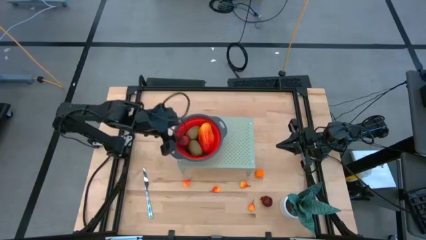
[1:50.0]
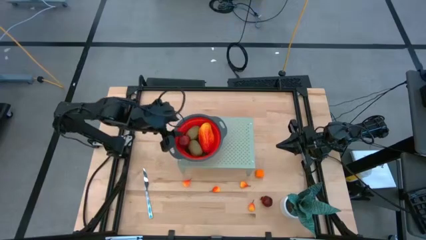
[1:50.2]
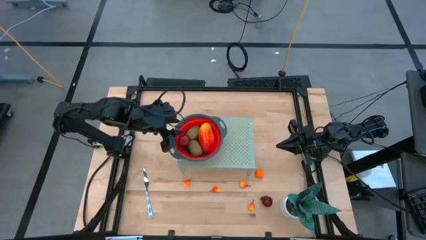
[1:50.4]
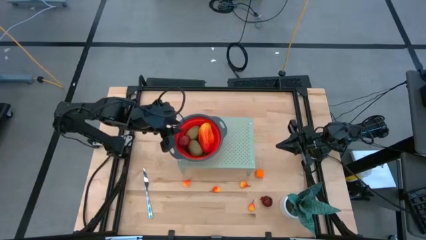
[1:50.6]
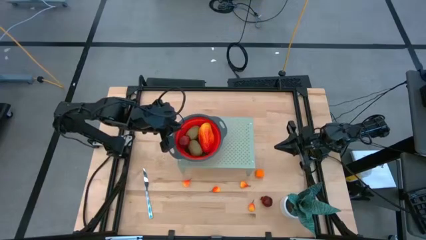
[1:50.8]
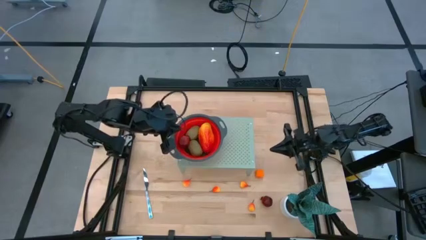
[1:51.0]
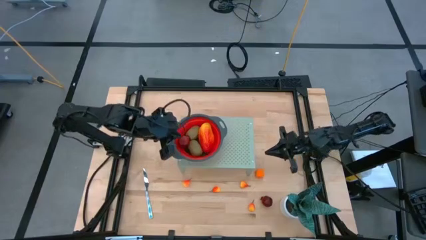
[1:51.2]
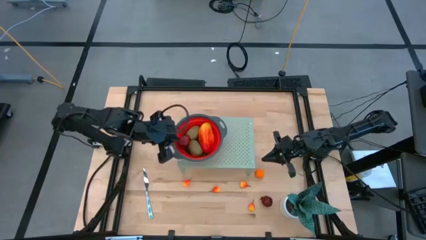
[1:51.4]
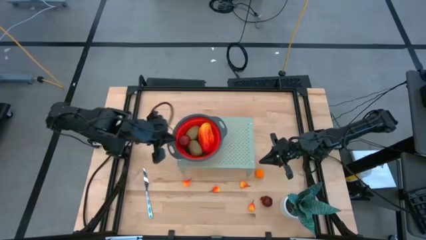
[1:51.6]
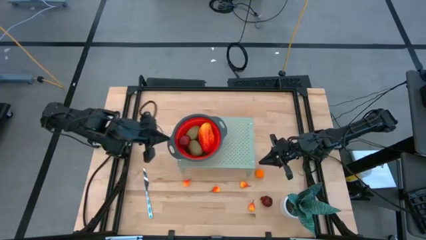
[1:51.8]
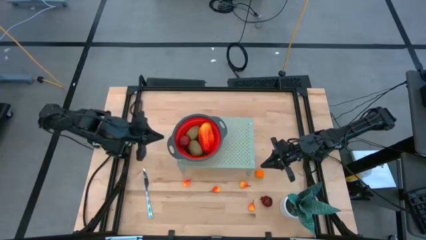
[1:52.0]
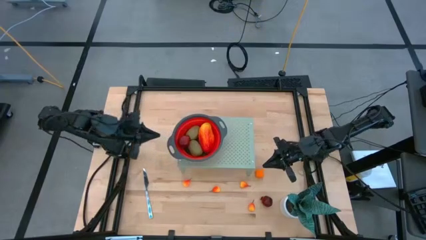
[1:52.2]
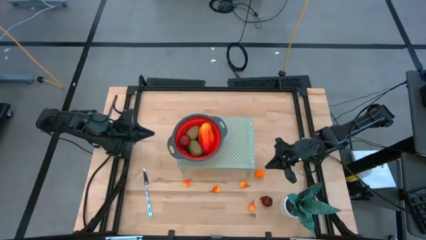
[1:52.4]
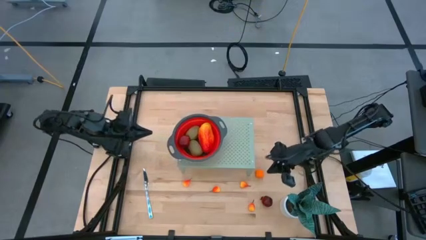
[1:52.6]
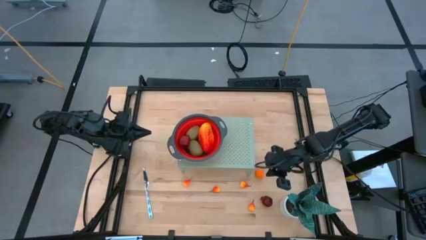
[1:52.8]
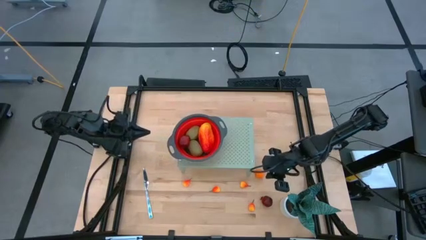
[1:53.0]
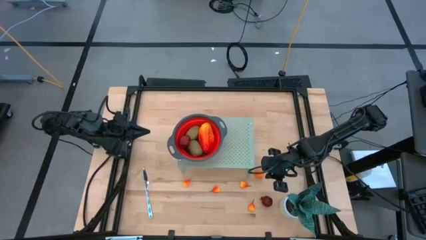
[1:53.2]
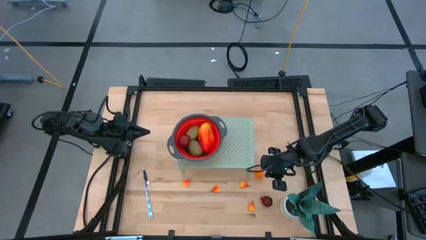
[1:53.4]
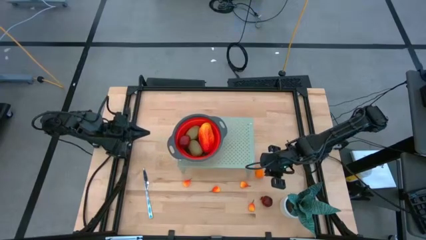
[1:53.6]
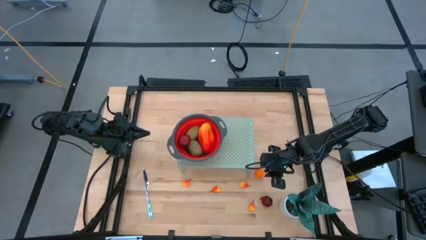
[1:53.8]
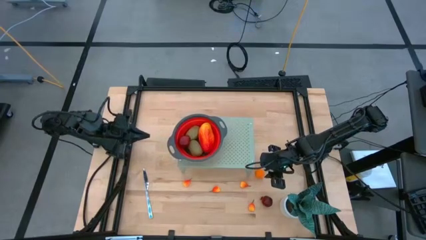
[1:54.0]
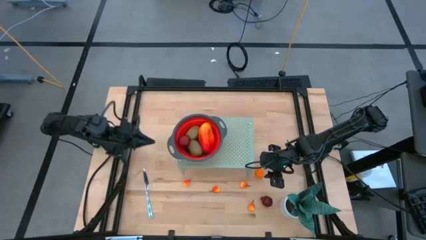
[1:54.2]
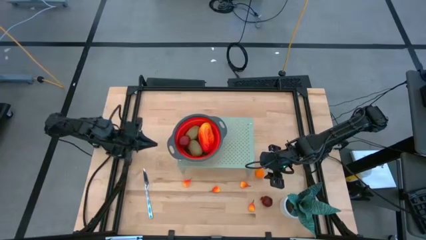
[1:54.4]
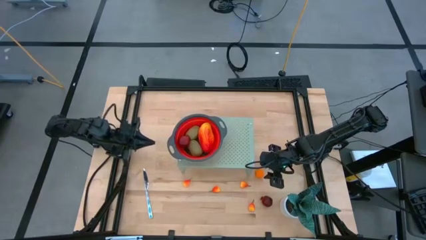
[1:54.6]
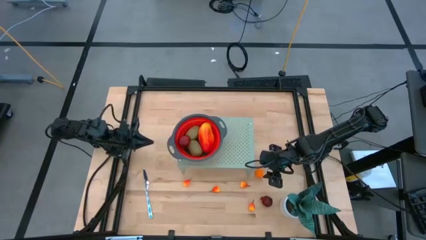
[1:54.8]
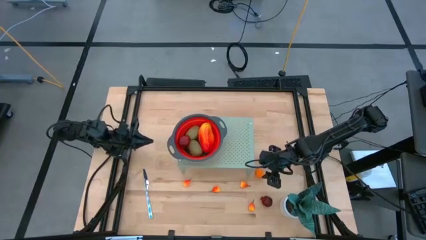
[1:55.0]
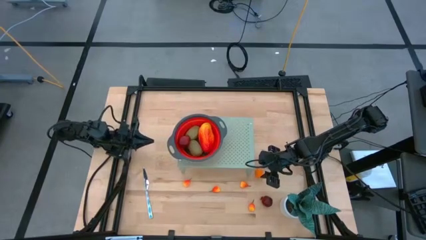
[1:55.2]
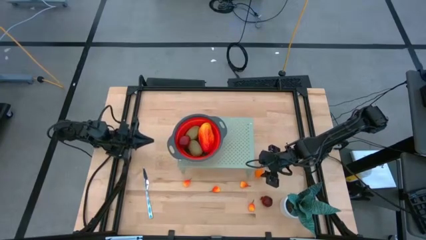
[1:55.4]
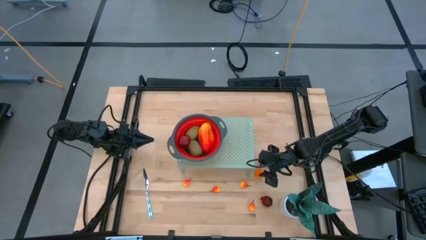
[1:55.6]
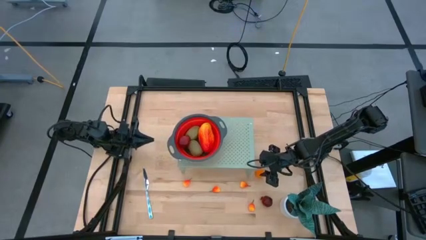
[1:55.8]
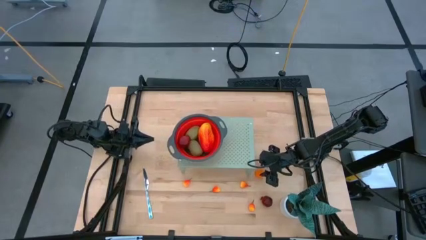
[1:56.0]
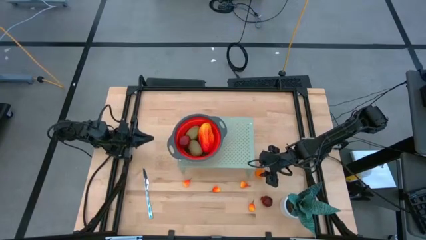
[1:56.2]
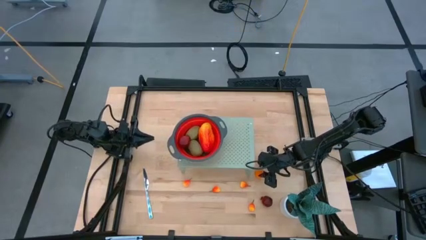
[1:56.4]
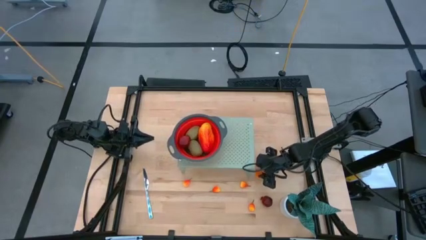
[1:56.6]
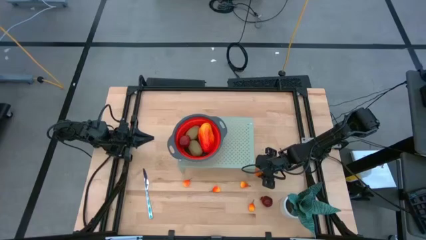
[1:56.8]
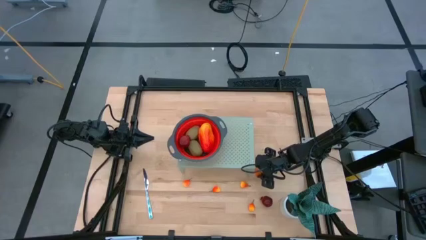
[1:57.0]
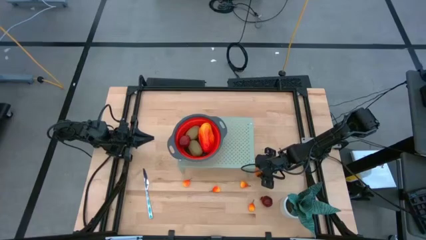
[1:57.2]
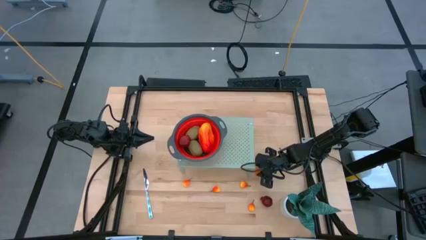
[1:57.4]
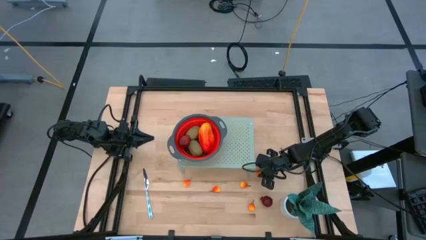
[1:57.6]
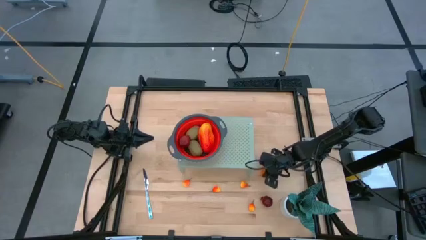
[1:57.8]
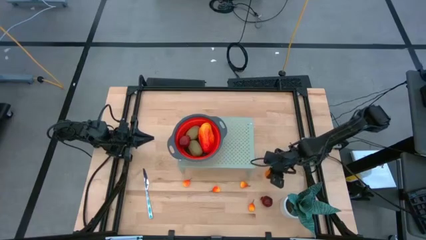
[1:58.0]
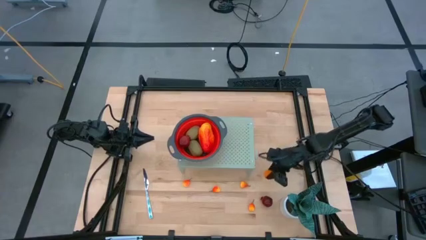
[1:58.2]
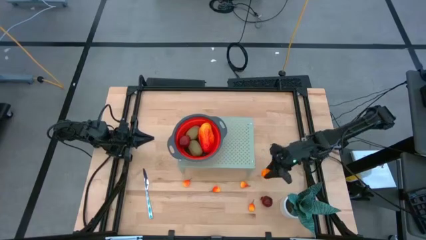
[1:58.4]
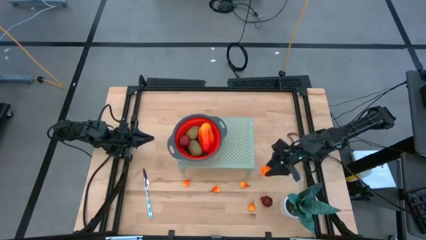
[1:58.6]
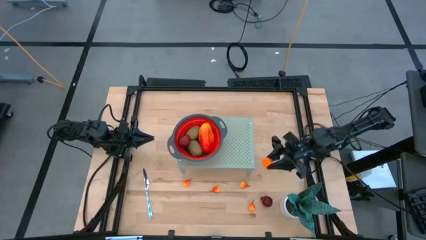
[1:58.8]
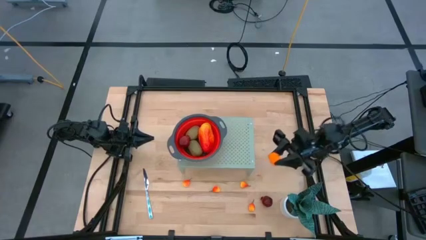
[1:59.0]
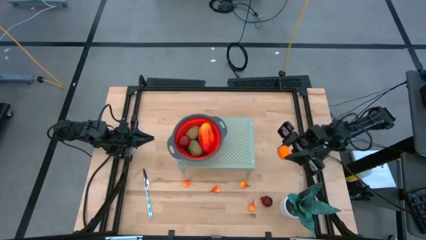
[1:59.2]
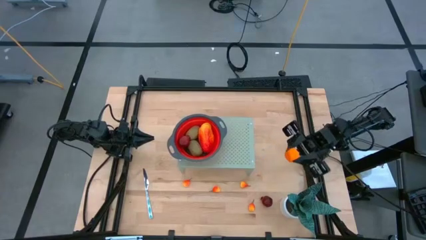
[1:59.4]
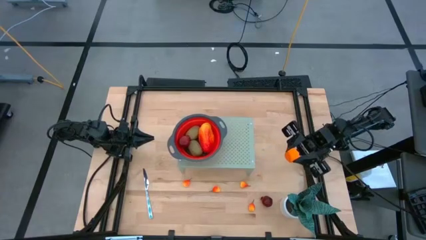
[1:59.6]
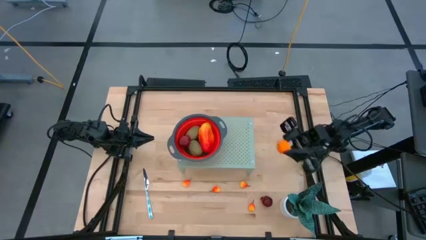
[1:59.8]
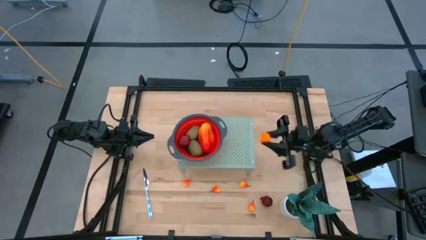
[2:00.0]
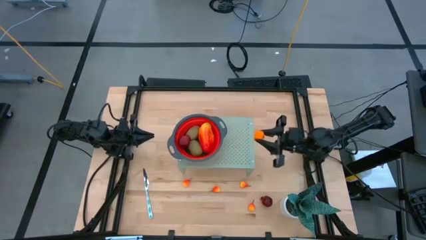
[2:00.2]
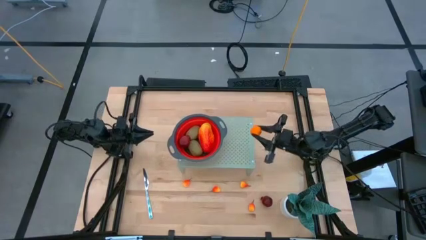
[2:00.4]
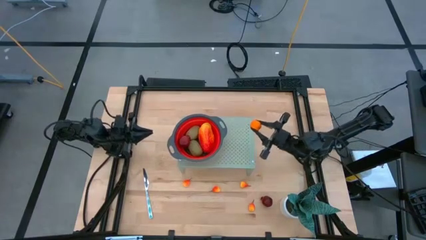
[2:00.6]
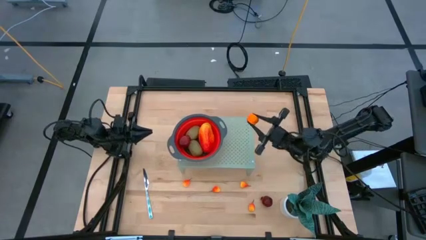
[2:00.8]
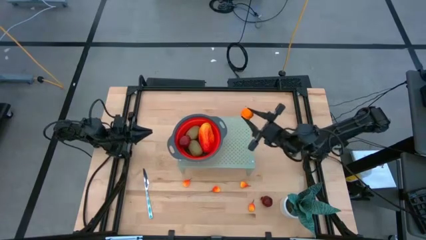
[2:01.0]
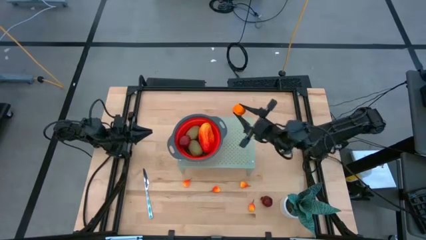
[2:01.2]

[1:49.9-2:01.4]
Task: Pick & Place Fruit
Put the orange fruit into the strainer
